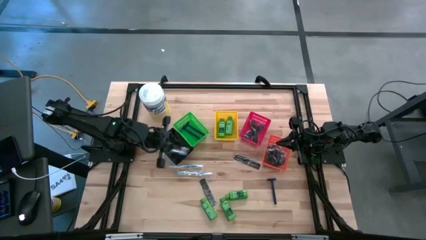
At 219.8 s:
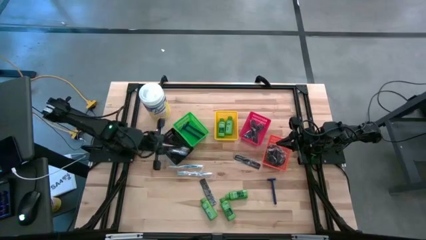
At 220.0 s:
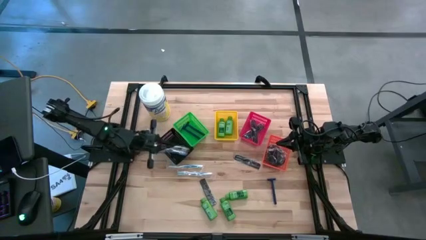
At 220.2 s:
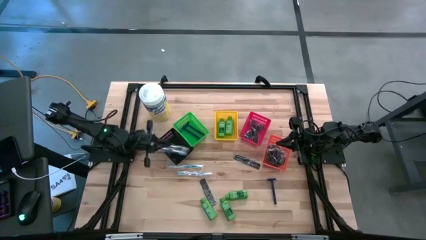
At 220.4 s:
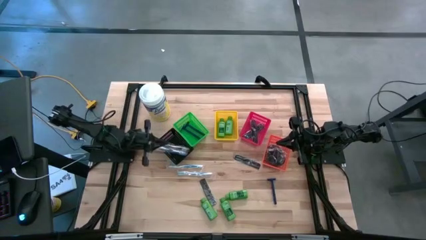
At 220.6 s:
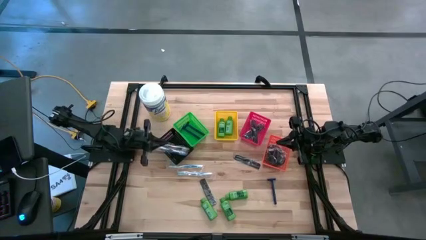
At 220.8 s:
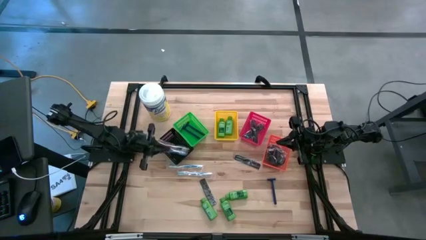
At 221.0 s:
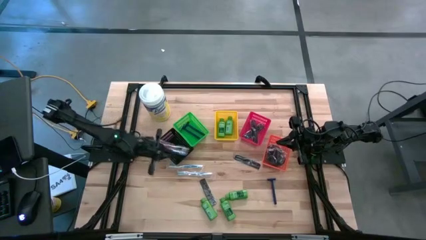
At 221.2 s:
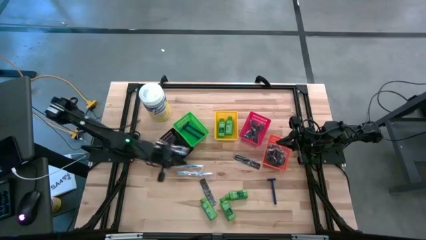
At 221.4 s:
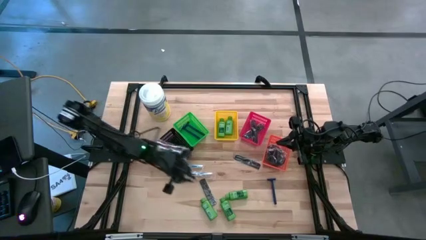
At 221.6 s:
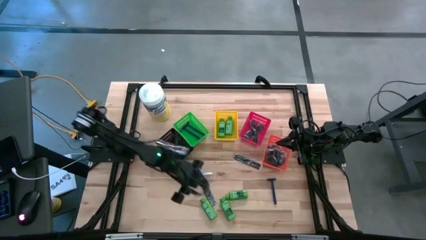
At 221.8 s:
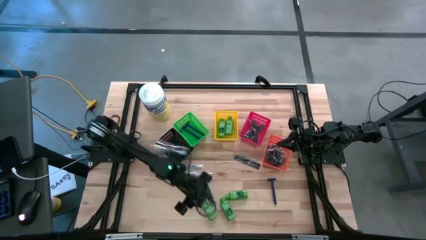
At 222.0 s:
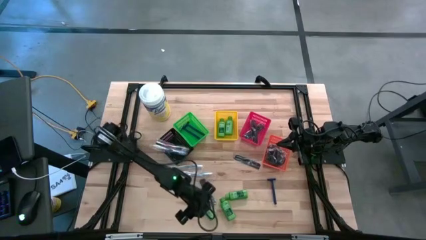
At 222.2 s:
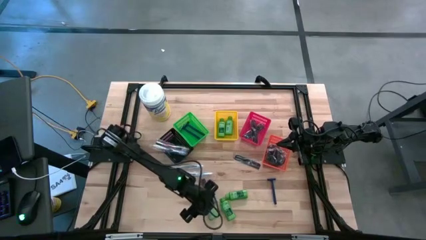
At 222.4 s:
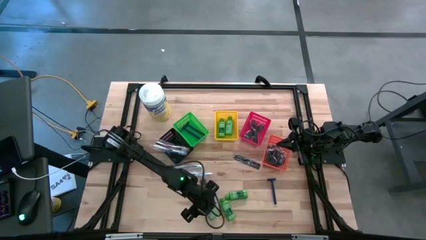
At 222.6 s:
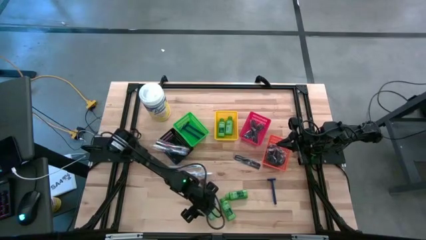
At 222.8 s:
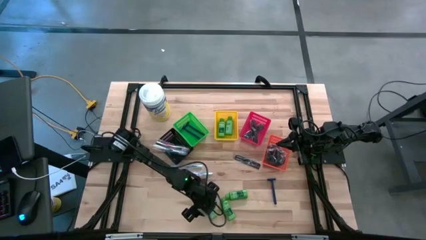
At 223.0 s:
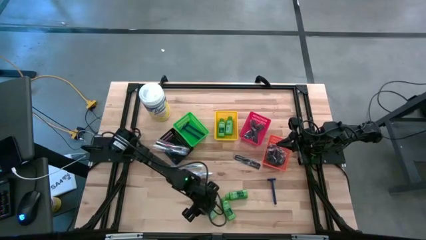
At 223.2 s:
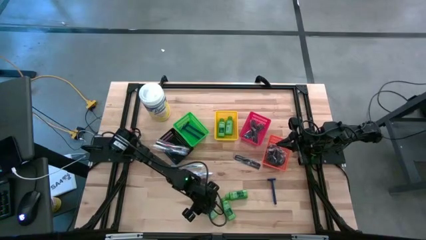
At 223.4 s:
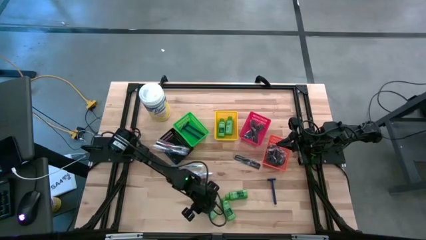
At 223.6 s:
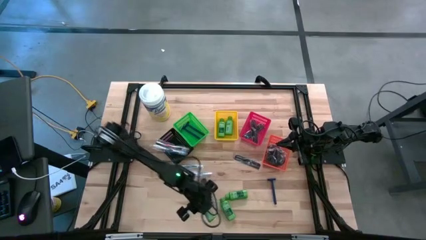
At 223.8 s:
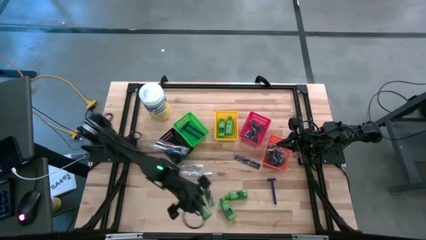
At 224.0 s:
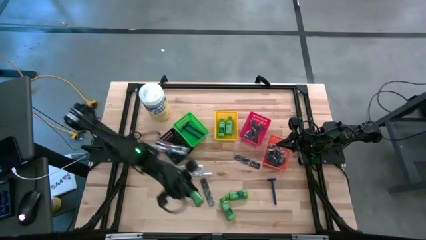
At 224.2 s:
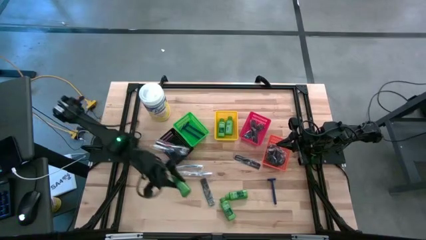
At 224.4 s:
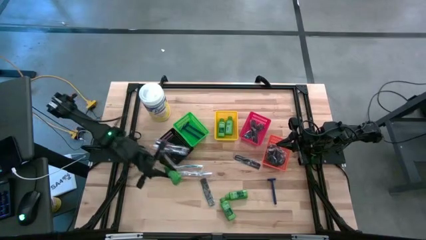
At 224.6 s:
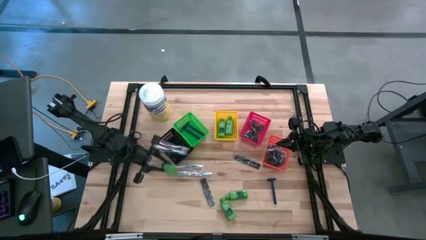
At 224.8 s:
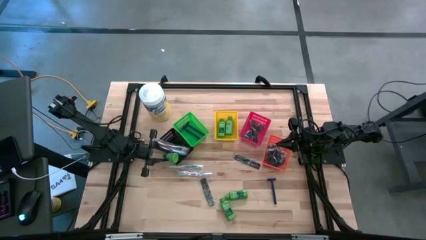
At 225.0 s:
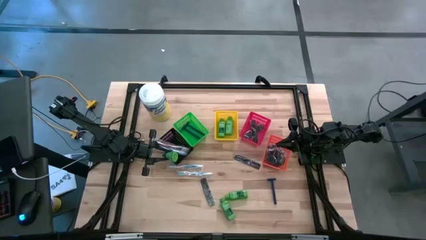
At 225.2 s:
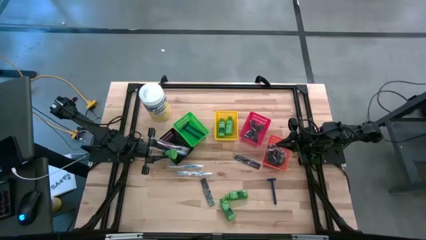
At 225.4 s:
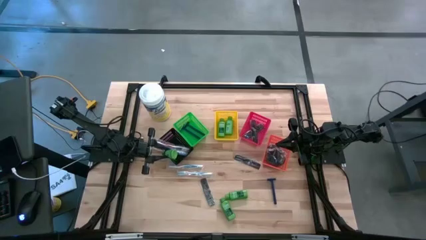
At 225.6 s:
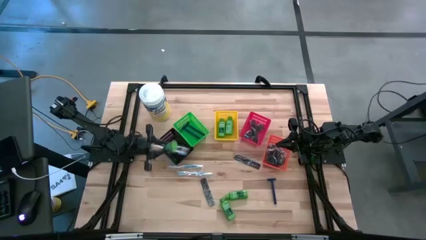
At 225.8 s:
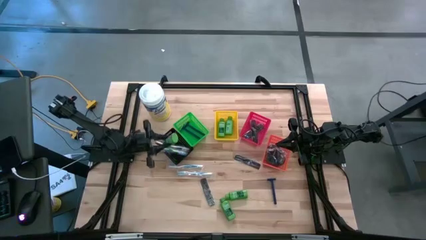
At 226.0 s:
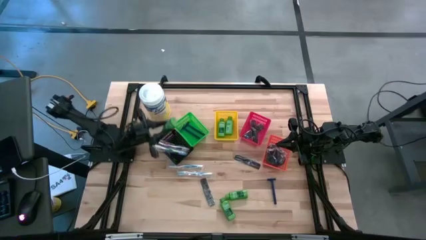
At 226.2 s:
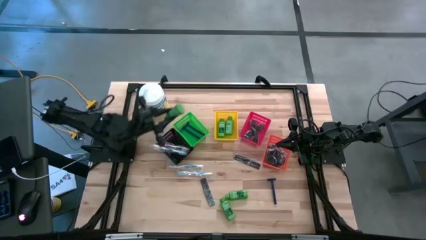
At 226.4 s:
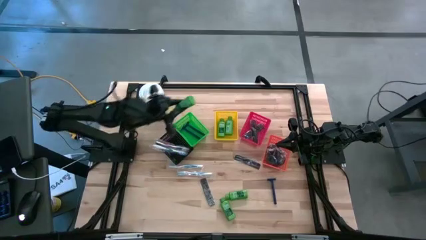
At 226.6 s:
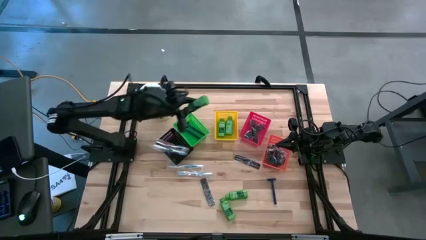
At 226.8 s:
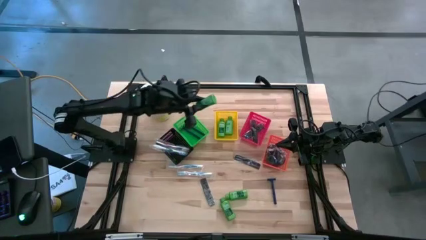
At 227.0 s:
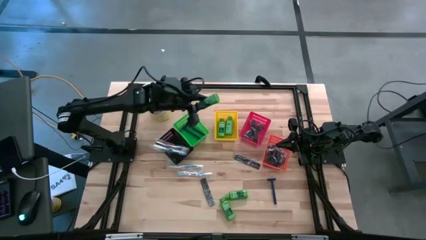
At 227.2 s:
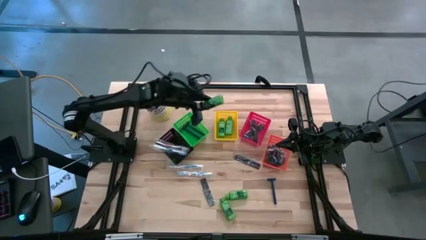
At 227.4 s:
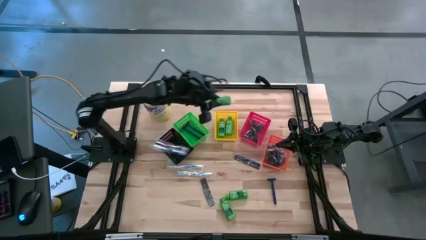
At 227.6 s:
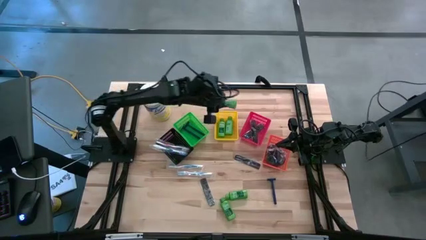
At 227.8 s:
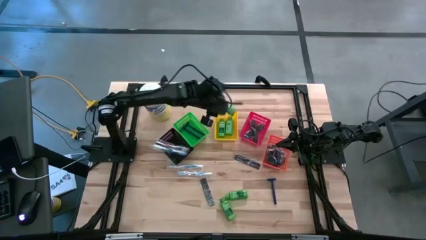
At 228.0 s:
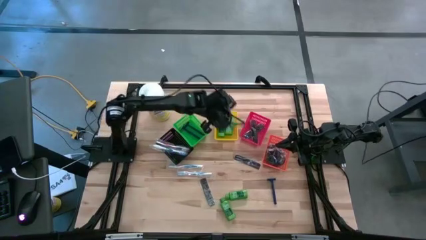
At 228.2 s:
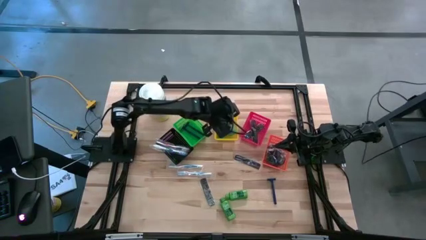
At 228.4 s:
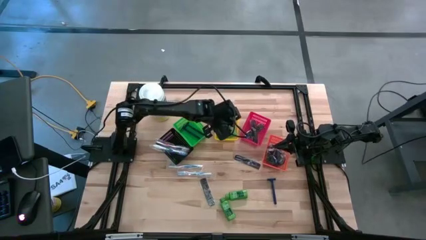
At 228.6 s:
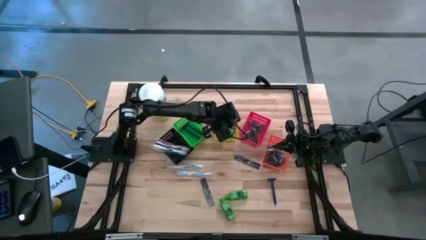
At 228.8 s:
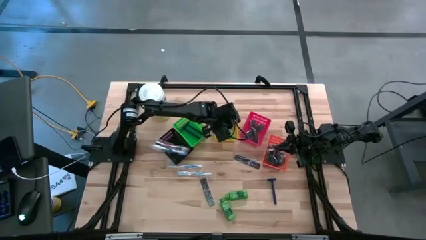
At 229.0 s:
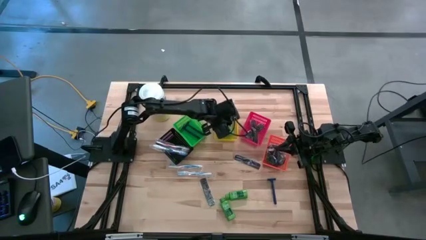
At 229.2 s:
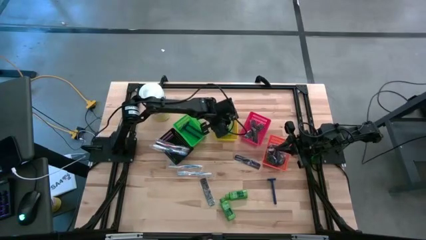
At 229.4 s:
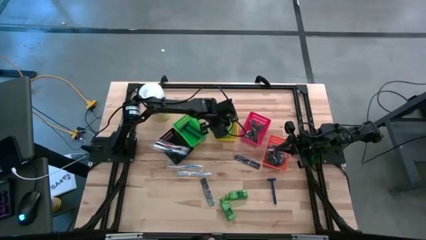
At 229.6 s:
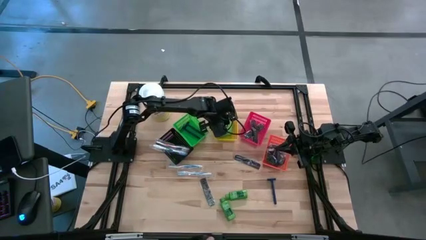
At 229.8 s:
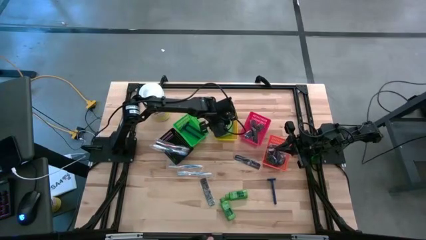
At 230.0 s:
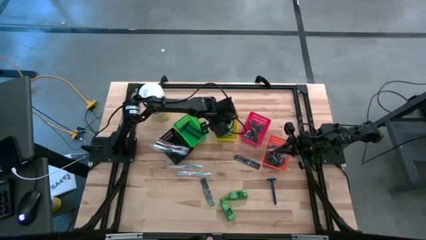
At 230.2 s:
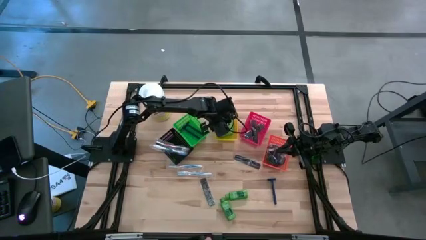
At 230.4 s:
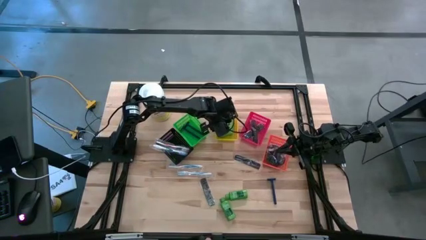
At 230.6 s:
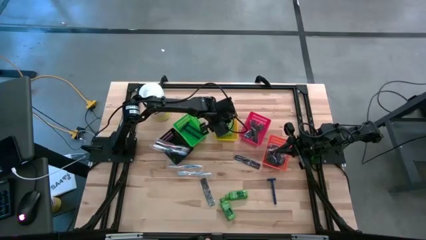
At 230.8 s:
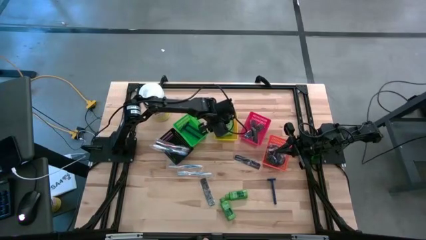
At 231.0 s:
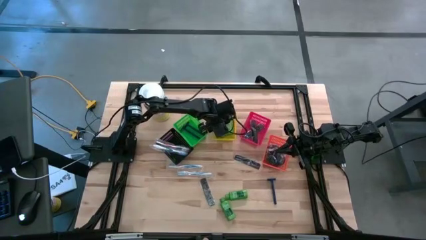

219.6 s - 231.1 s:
Task: Pick & Place Travel size toiletries
Put the left green bottle shampoo into the yellow bin

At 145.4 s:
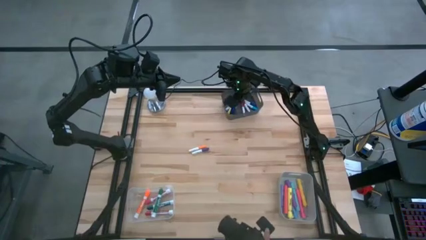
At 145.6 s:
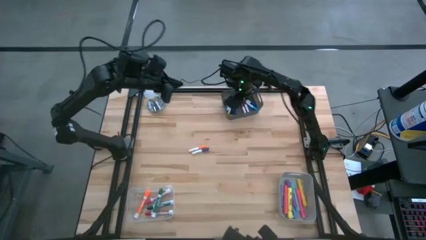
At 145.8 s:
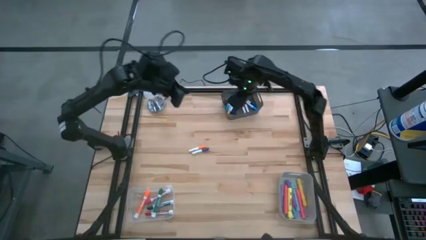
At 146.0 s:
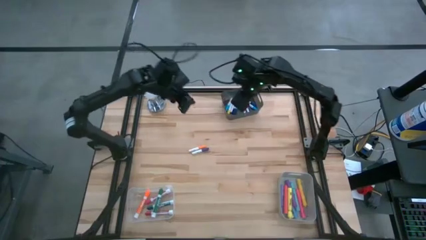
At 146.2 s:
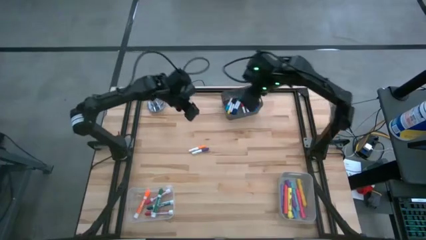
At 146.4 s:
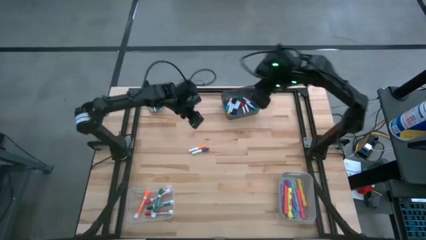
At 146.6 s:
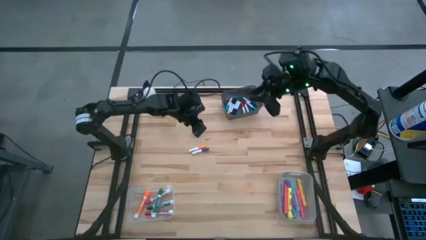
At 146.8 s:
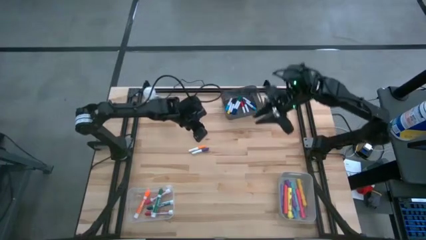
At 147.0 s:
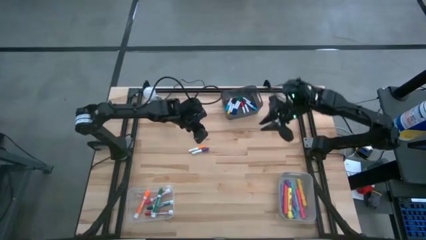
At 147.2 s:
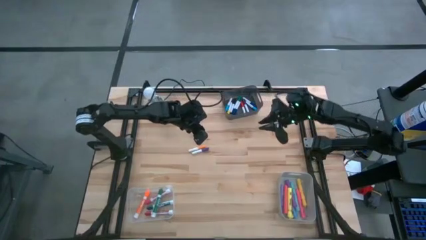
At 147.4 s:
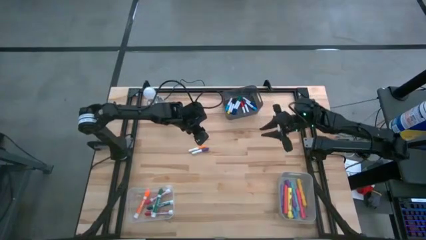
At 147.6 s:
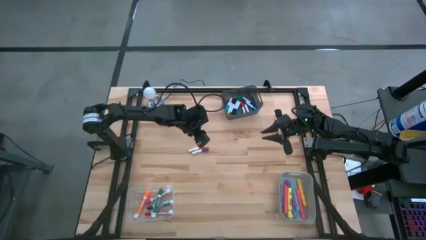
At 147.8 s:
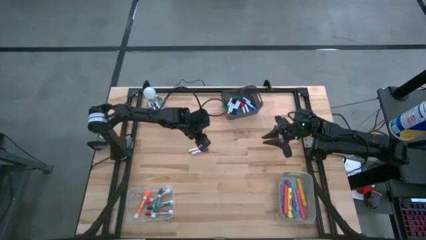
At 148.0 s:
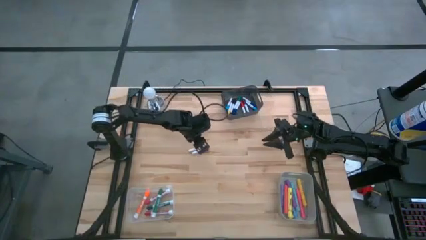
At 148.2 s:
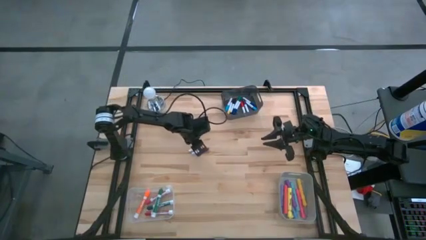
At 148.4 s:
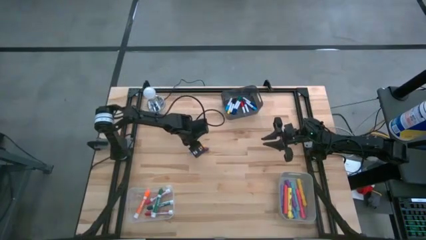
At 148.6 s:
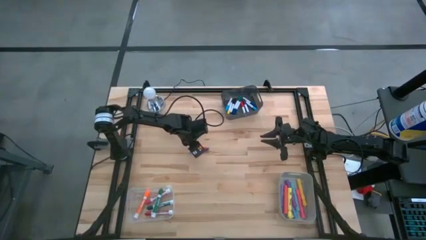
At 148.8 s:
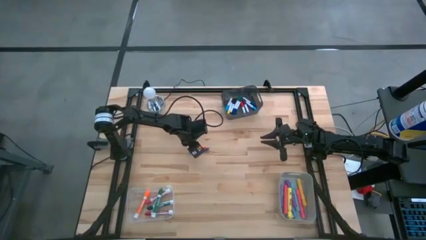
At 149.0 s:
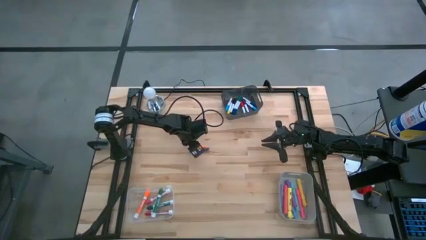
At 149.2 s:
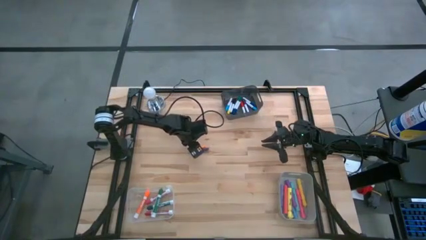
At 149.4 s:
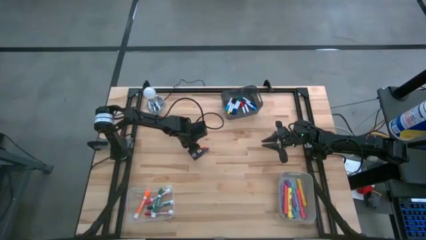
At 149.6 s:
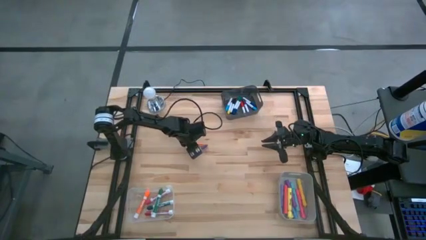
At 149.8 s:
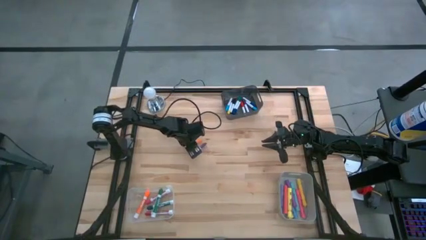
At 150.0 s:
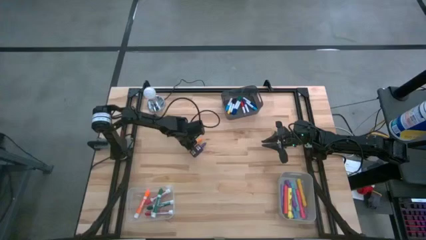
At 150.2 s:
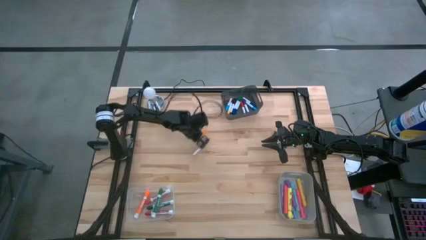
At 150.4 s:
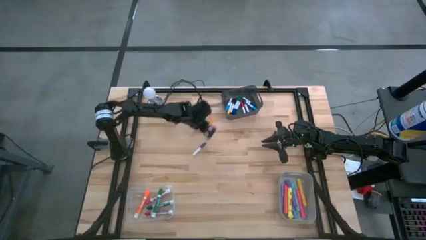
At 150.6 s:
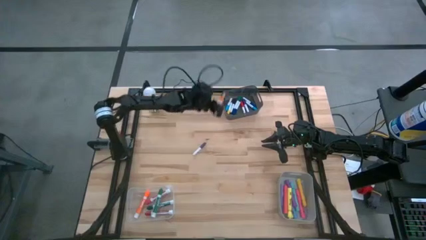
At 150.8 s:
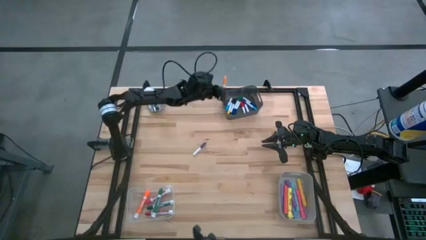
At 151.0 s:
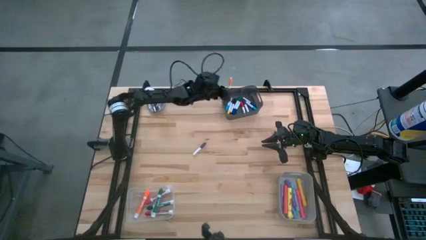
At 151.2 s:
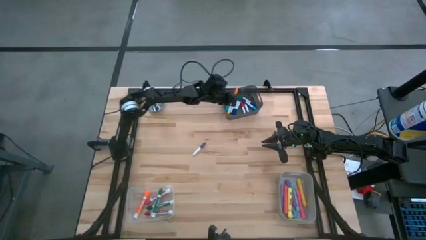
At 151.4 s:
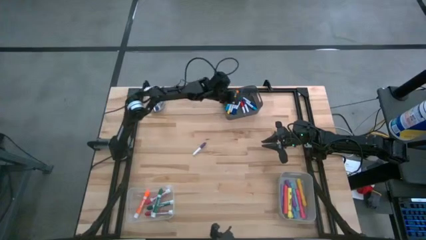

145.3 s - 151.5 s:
Task: Pick & Place Markers
Put the small orange highlighter pen into the black bin
